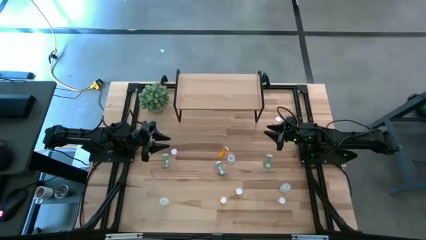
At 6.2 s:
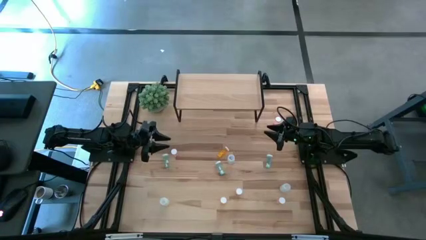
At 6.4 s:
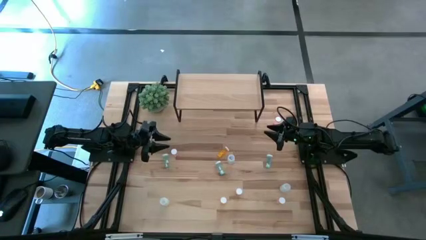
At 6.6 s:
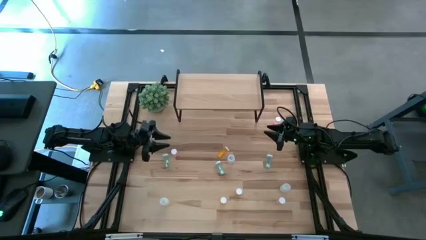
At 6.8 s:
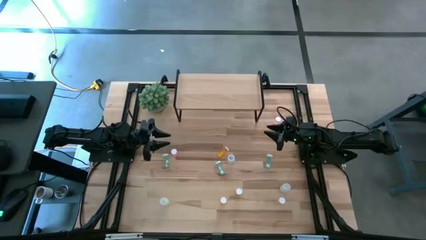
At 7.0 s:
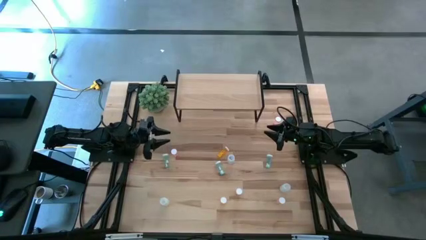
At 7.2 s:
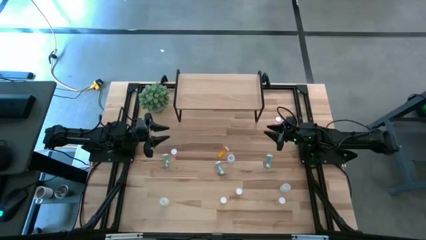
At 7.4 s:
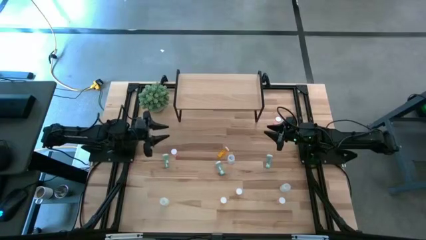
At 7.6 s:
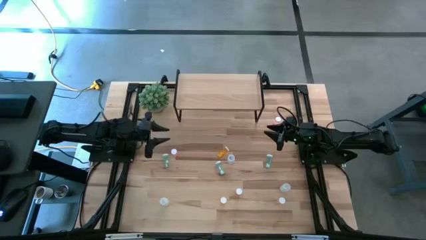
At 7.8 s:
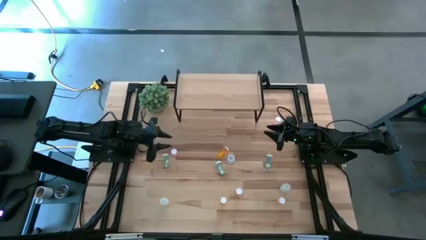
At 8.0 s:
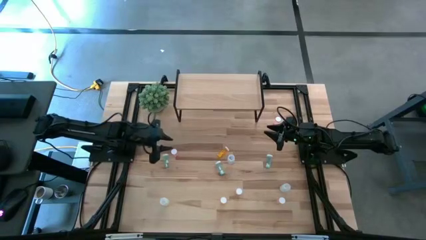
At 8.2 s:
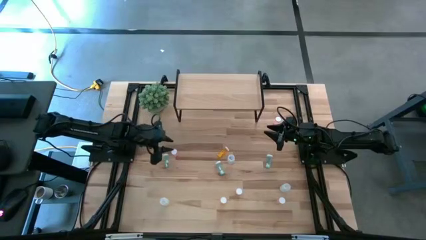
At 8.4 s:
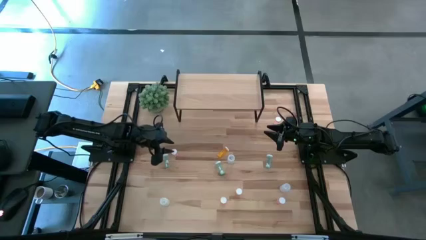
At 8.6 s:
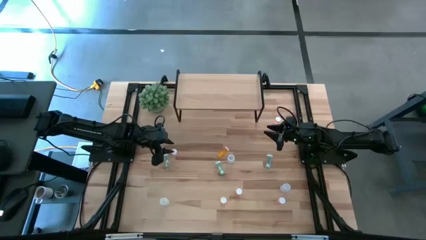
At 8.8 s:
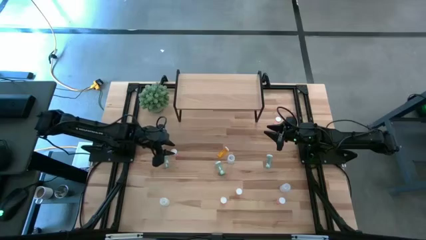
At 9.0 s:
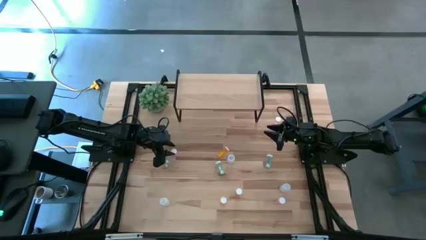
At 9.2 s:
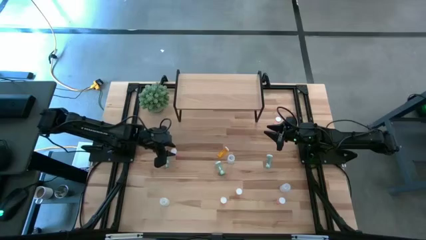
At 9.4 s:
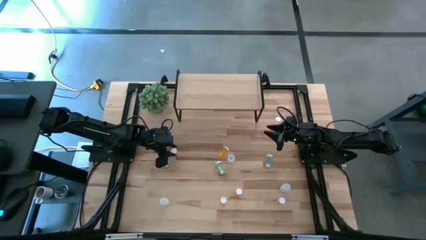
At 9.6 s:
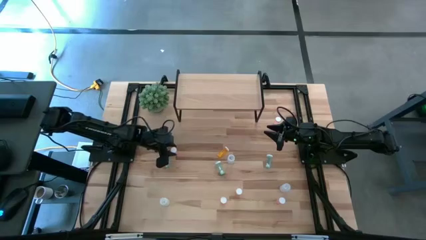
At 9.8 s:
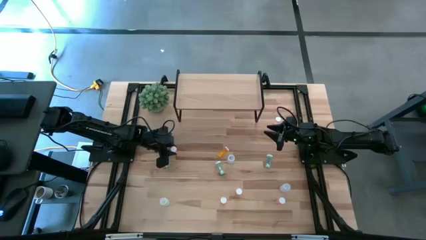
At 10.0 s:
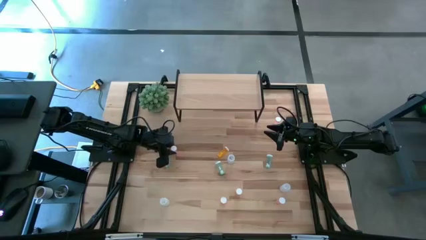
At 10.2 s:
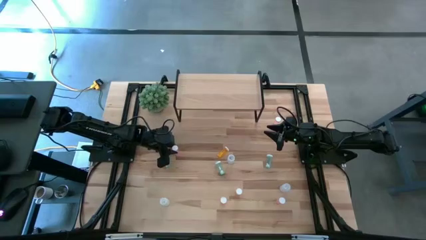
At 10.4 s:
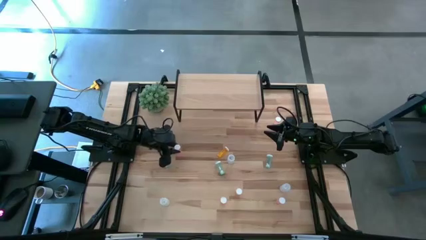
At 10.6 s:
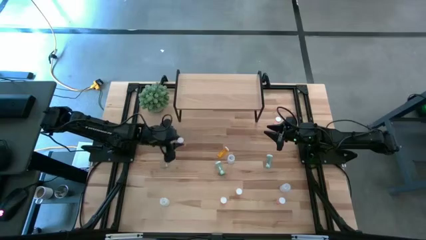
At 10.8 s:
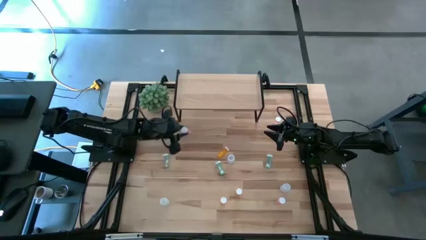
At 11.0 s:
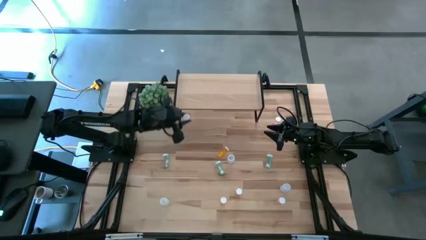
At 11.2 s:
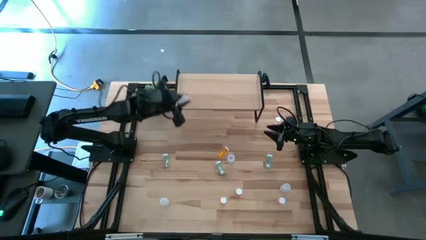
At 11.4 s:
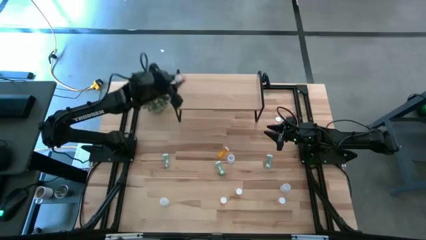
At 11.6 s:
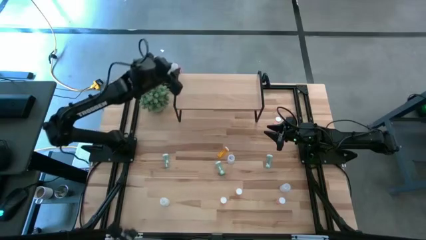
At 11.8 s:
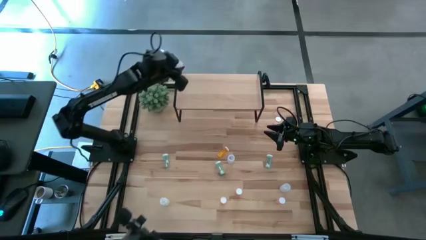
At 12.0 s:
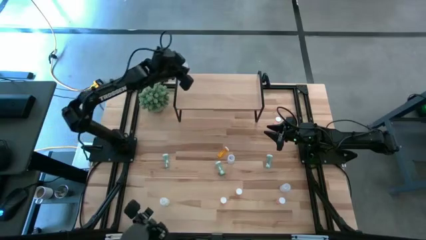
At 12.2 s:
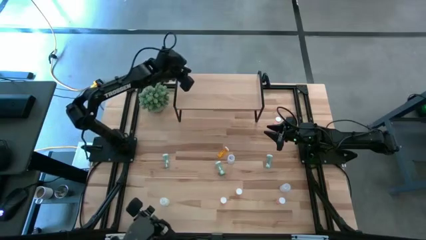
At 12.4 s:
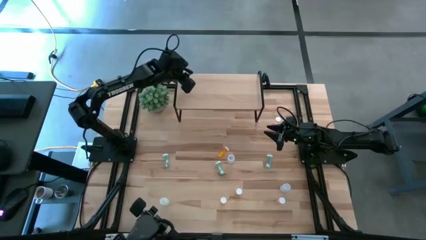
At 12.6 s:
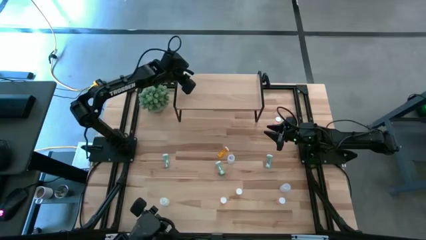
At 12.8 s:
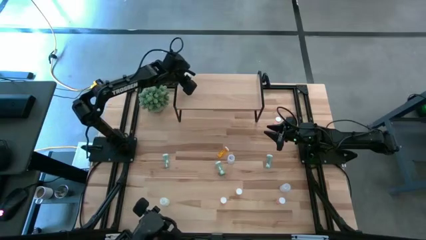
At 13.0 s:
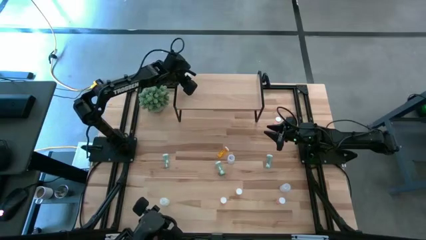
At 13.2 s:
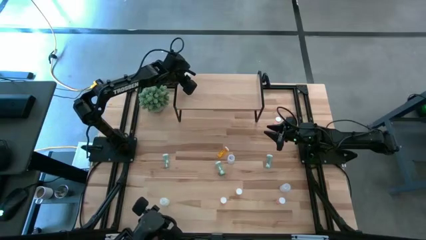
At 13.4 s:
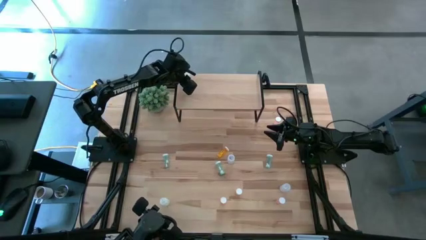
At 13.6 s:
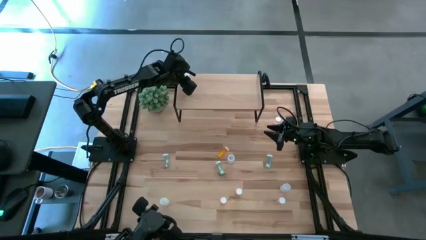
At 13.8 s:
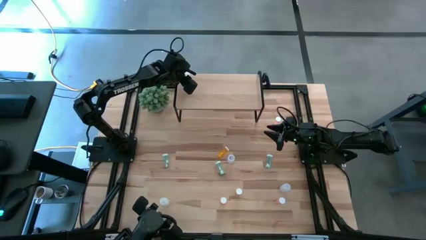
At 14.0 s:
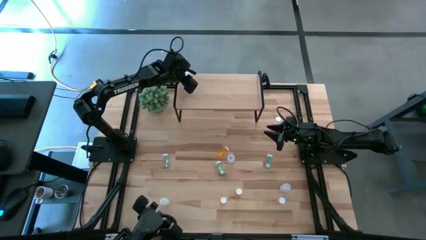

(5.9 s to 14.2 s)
Task: Pick and place medicine bottles onto shelf by color
Put the top left pink pill bottle on the shelf

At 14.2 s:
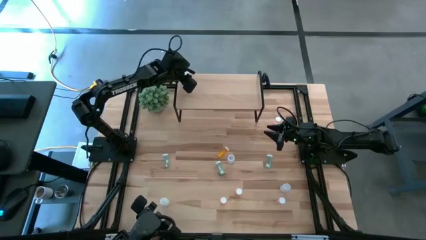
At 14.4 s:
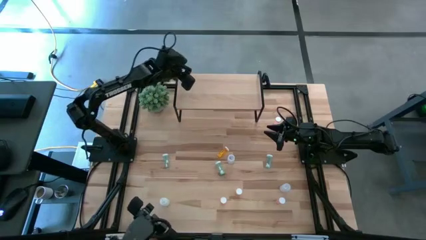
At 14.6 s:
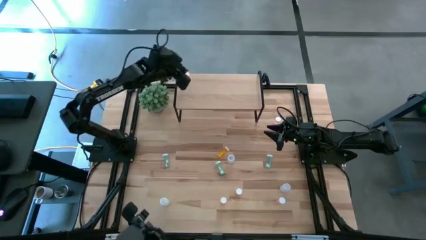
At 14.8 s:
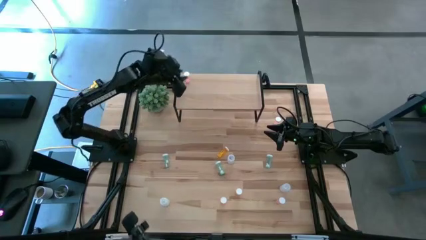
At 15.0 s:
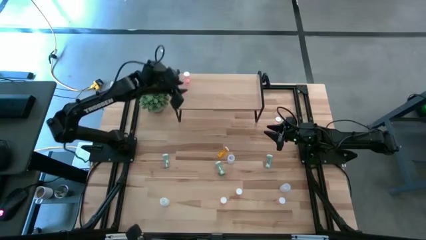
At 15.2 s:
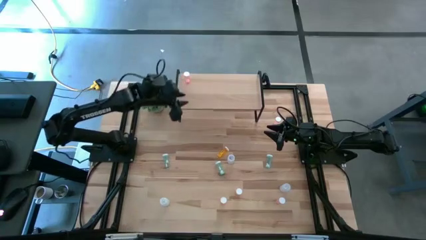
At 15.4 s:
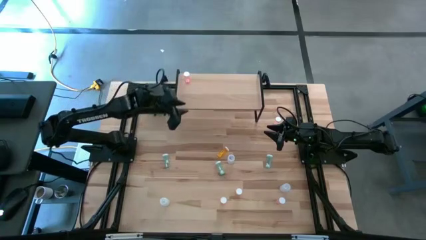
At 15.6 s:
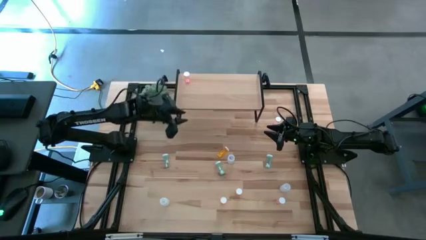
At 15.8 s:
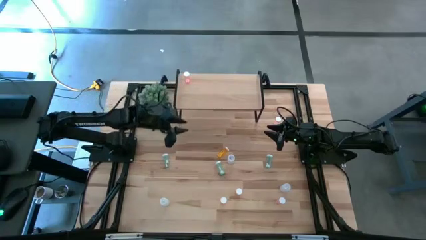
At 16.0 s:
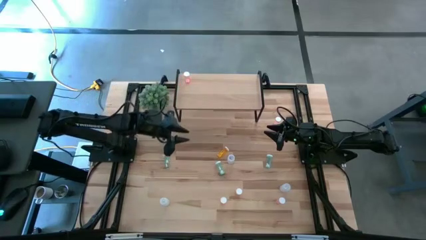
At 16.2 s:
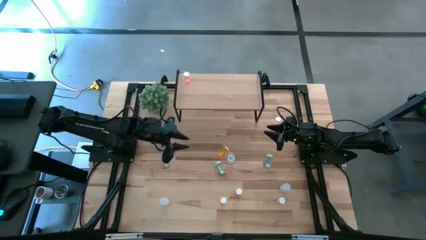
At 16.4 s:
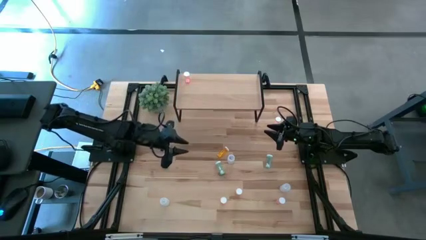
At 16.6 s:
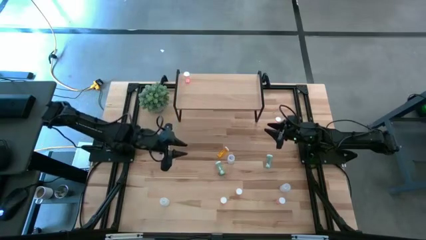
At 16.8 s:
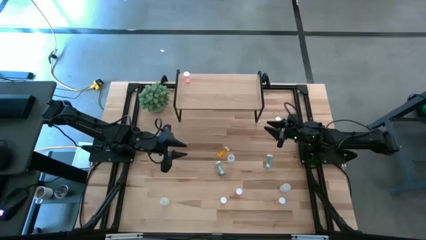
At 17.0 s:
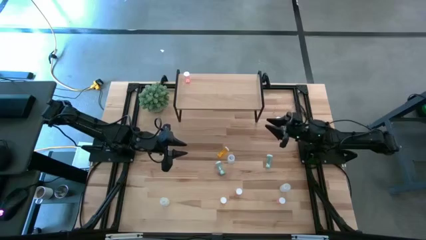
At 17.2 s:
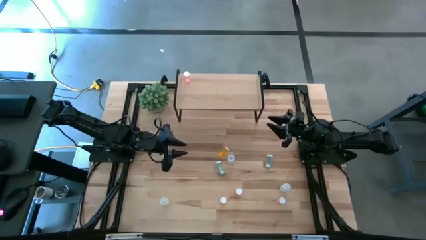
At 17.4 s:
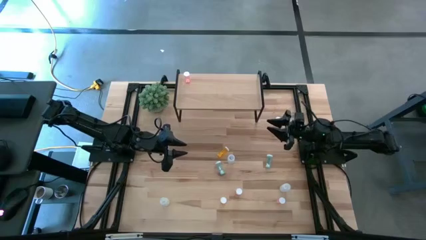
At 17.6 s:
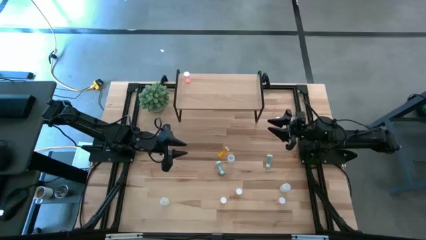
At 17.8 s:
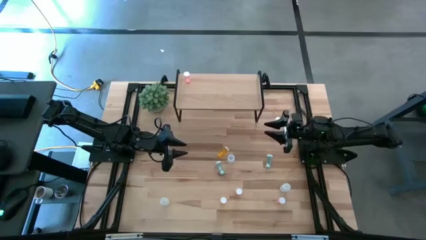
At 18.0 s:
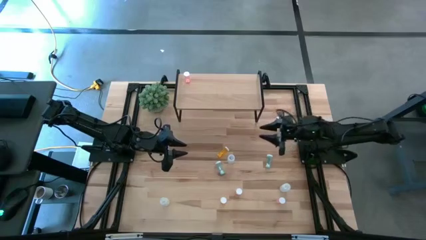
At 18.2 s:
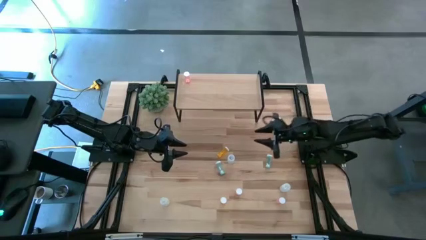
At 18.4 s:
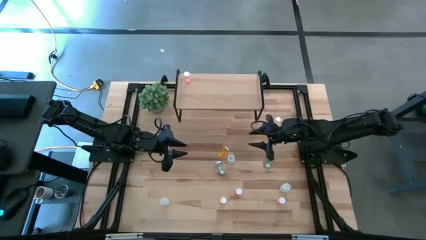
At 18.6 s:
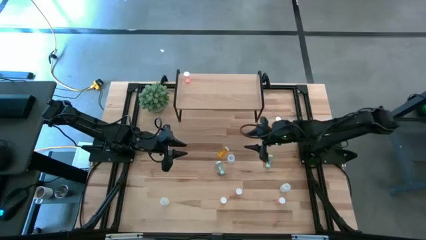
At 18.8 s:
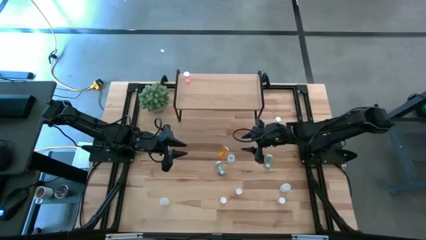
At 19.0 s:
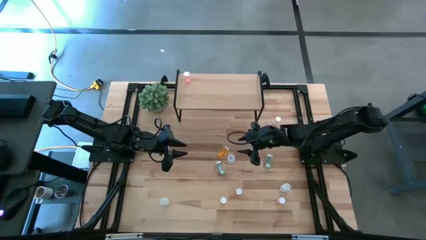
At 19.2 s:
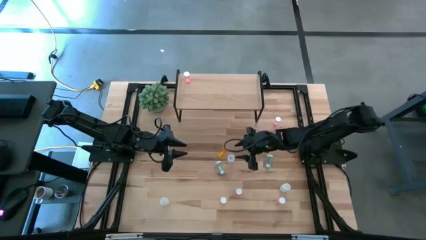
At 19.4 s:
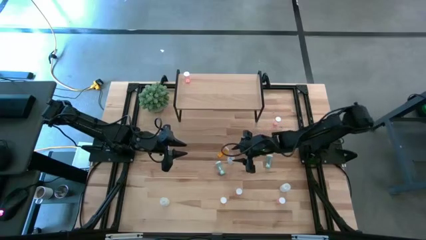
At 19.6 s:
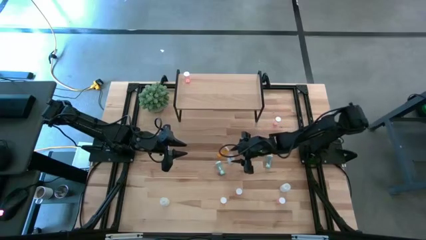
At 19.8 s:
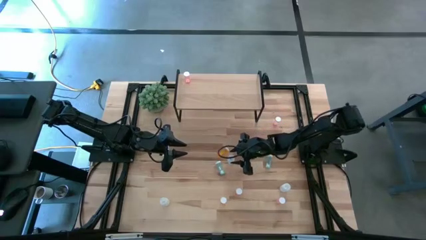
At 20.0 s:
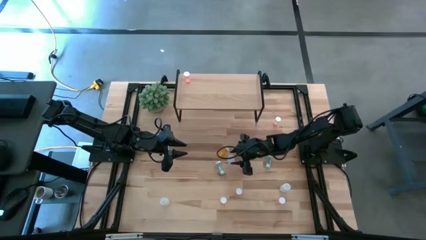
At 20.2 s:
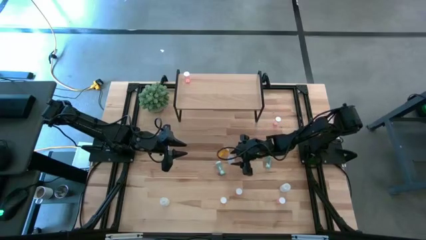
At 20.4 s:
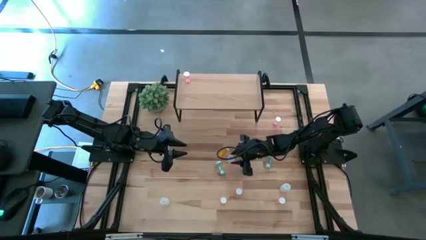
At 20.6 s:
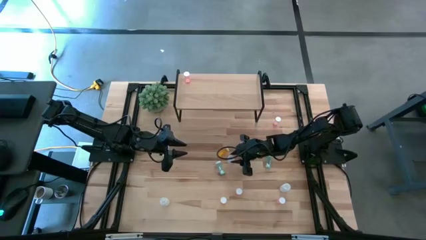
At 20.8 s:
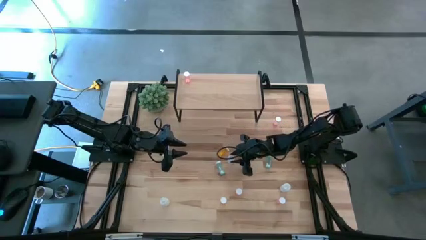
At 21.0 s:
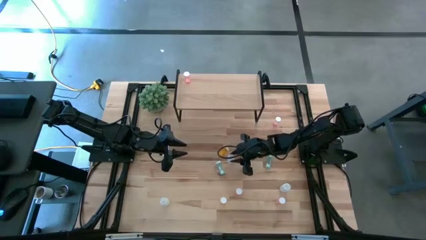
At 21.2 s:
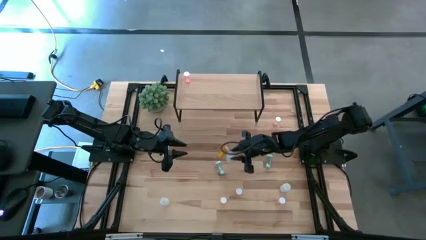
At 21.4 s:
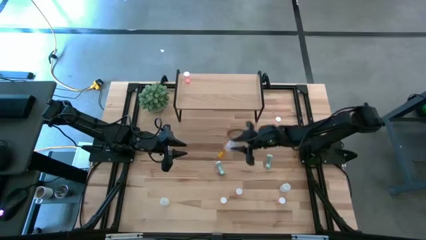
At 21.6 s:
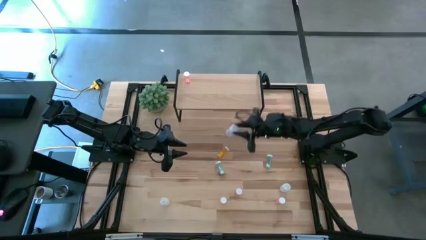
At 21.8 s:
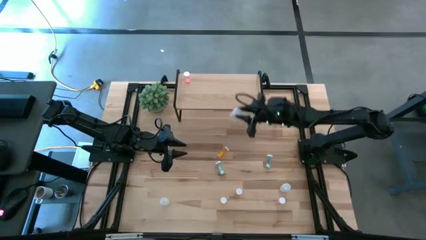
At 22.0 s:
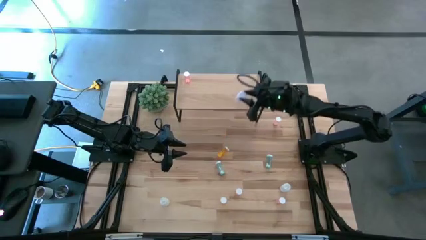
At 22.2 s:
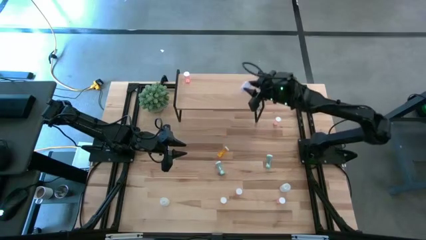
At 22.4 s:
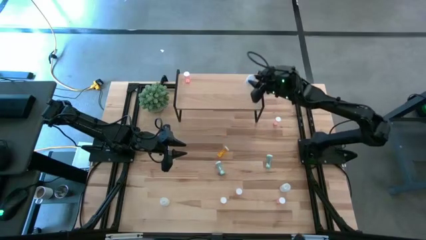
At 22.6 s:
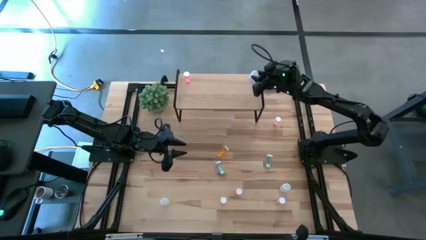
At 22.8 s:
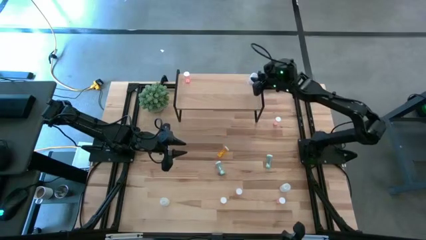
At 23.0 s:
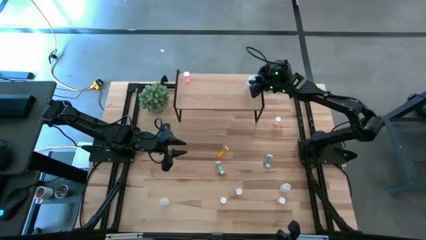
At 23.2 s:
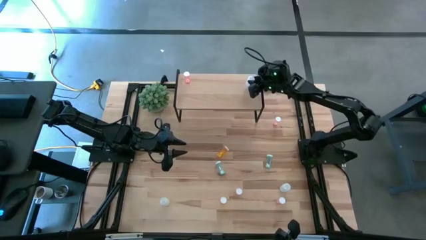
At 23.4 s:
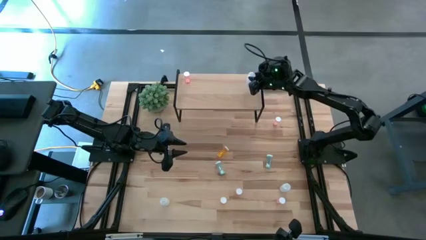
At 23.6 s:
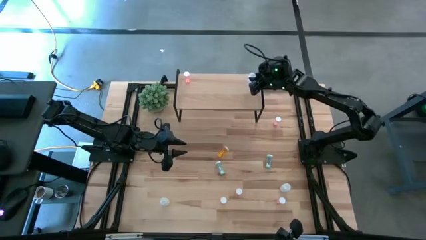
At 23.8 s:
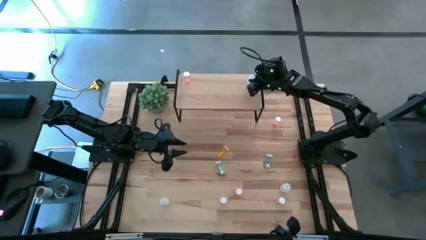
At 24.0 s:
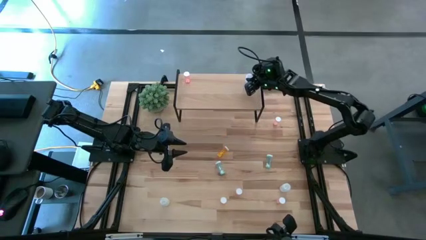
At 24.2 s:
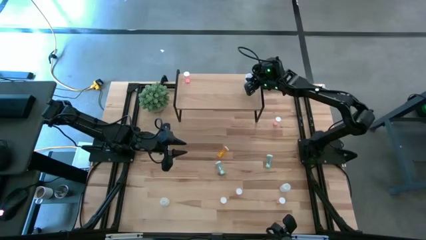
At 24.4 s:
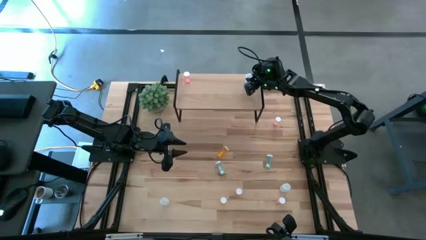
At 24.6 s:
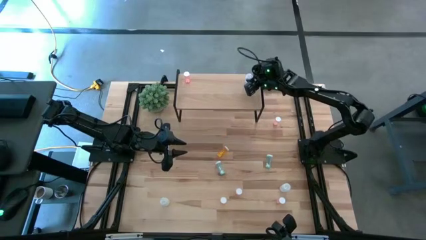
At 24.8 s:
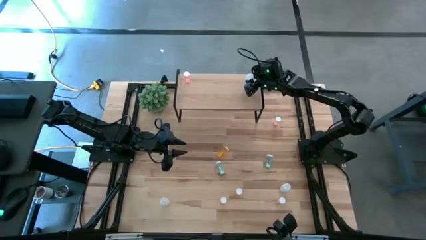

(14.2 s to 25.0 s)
Put the top white pill bottle on the shelf
